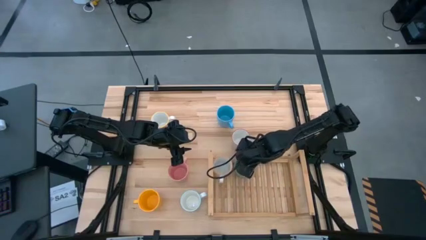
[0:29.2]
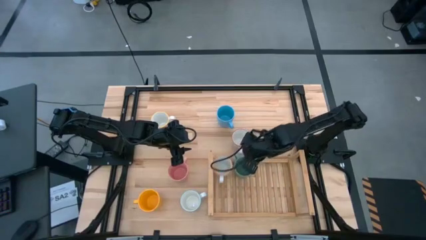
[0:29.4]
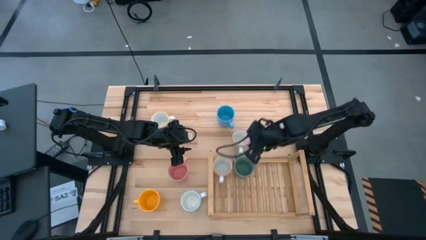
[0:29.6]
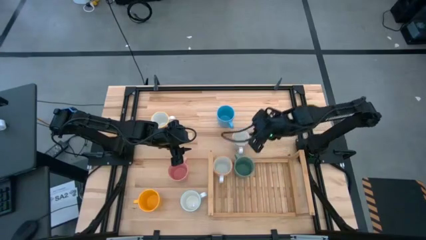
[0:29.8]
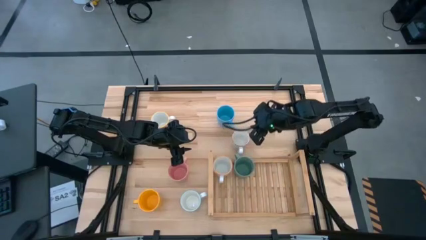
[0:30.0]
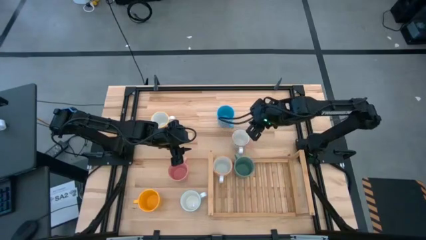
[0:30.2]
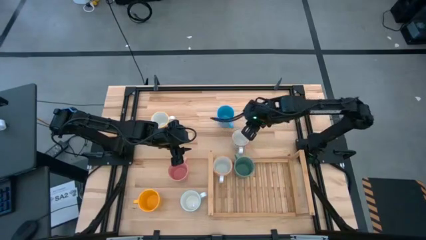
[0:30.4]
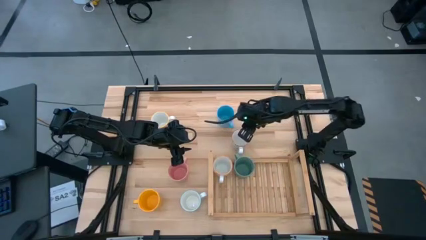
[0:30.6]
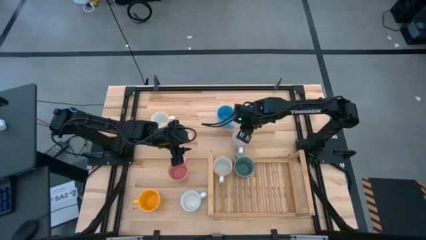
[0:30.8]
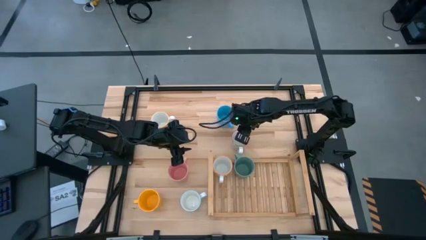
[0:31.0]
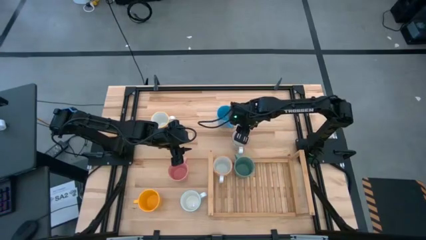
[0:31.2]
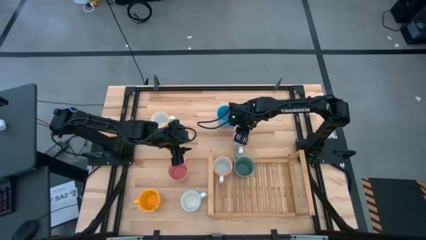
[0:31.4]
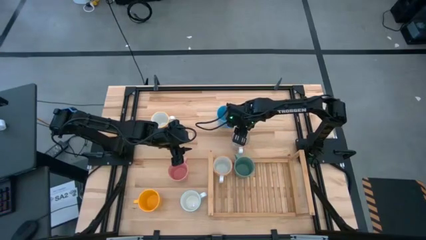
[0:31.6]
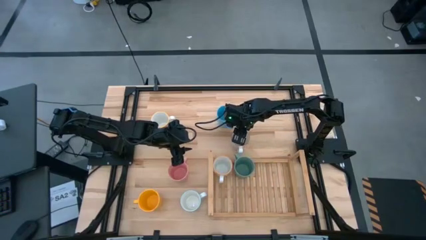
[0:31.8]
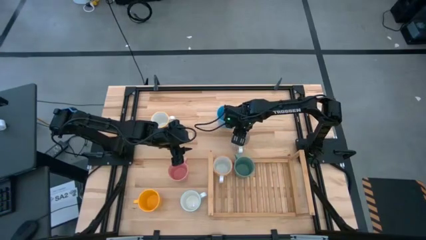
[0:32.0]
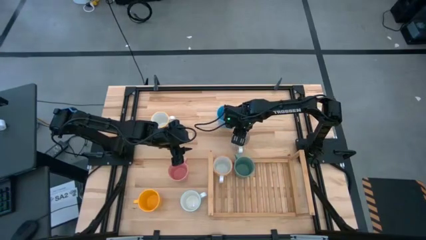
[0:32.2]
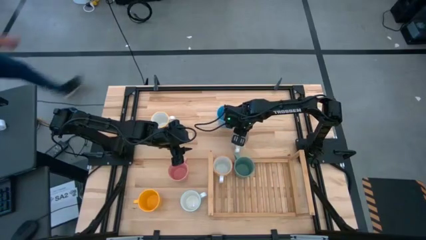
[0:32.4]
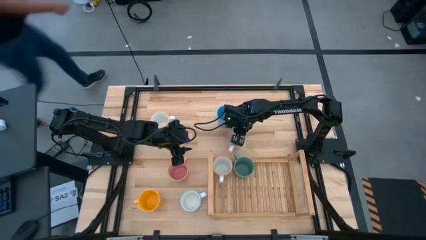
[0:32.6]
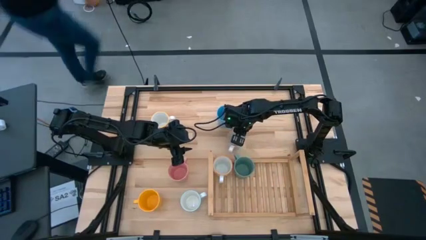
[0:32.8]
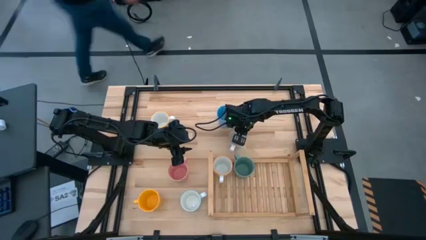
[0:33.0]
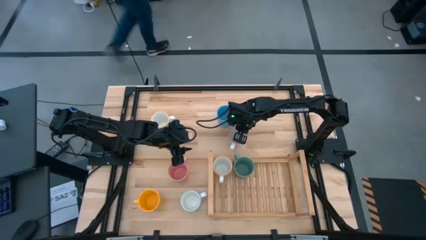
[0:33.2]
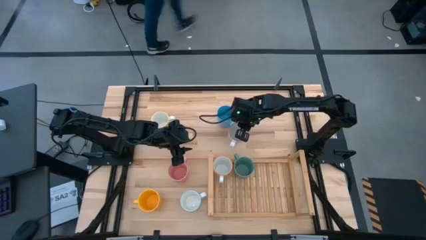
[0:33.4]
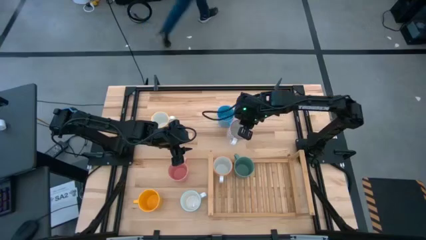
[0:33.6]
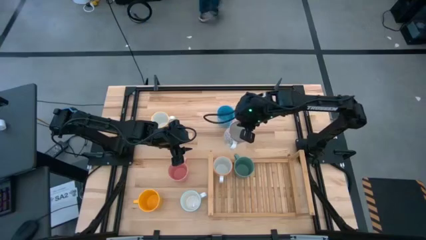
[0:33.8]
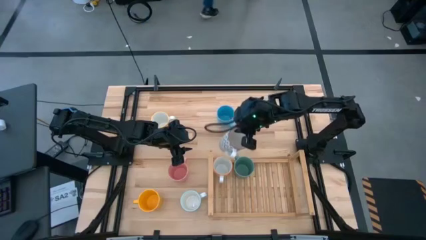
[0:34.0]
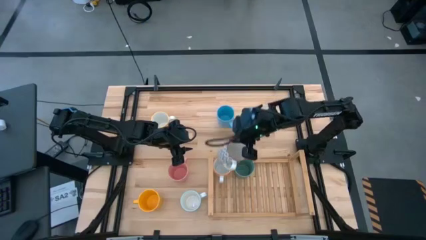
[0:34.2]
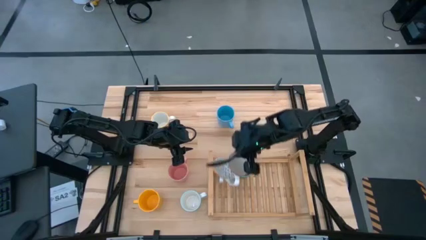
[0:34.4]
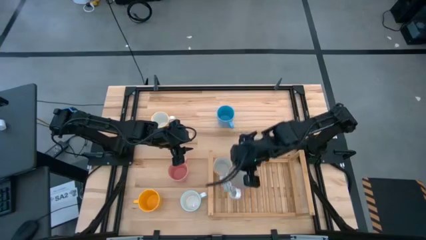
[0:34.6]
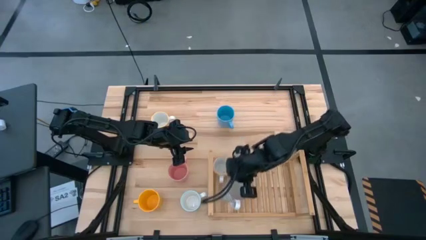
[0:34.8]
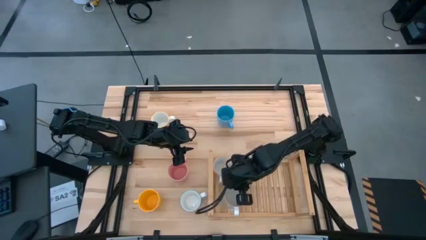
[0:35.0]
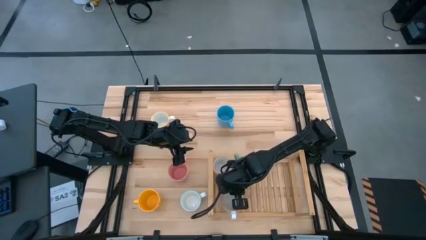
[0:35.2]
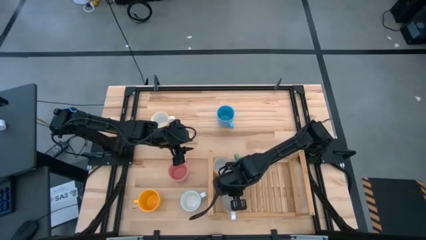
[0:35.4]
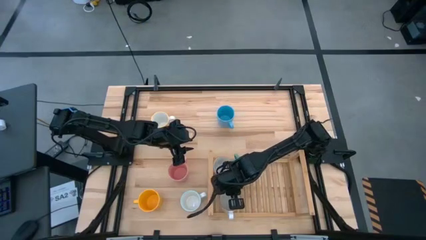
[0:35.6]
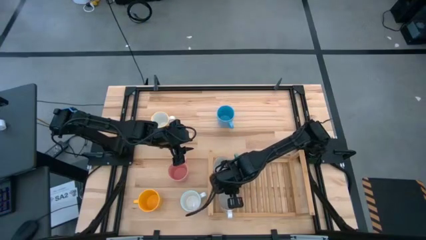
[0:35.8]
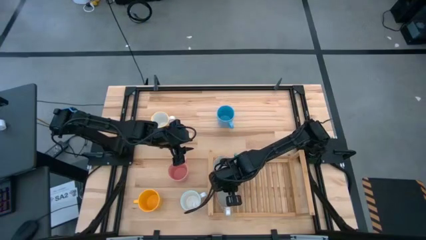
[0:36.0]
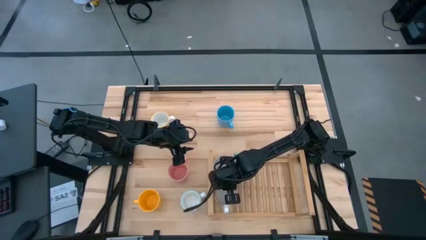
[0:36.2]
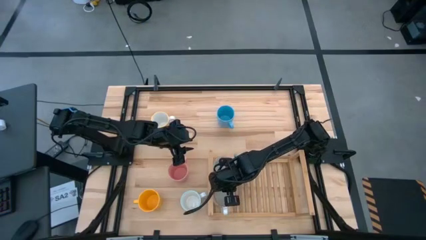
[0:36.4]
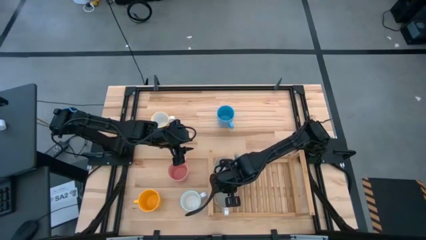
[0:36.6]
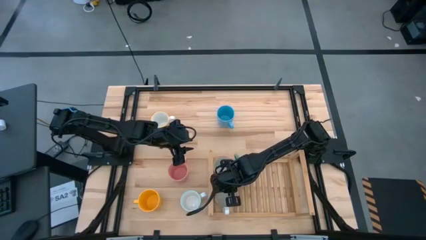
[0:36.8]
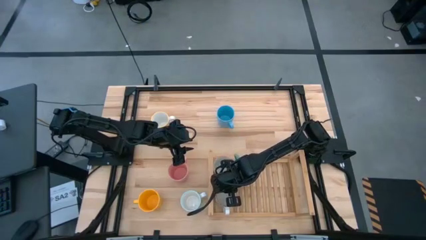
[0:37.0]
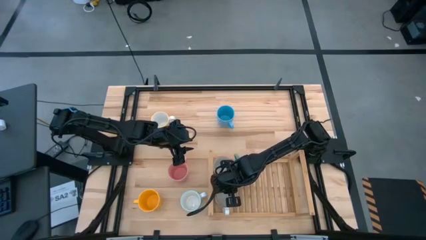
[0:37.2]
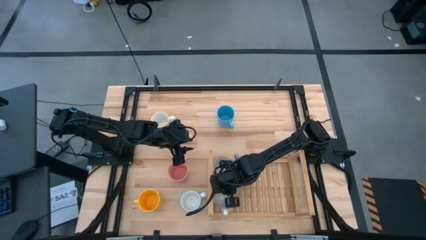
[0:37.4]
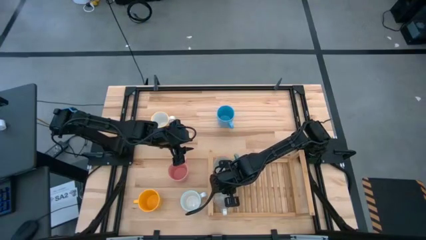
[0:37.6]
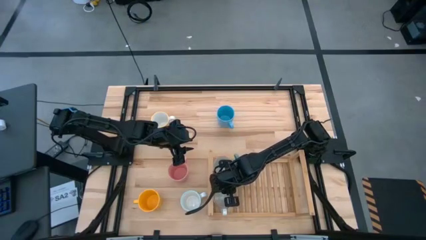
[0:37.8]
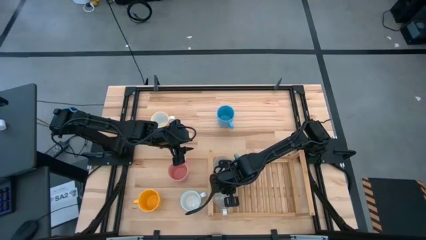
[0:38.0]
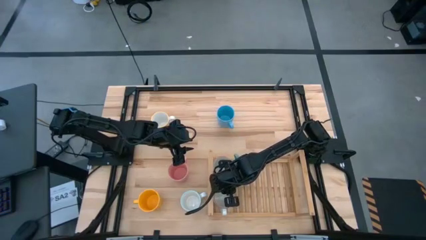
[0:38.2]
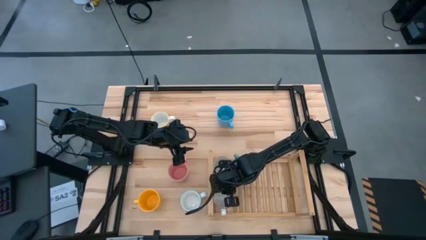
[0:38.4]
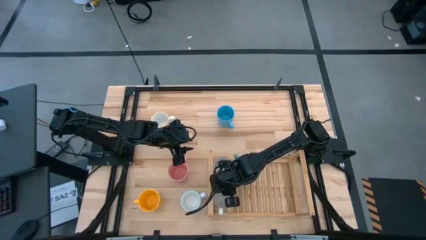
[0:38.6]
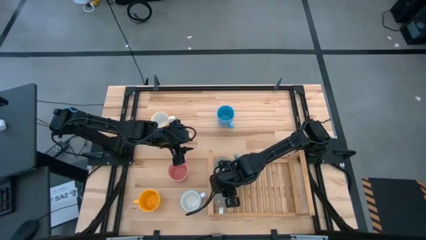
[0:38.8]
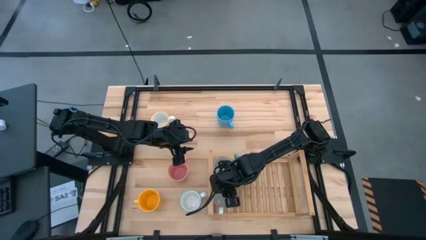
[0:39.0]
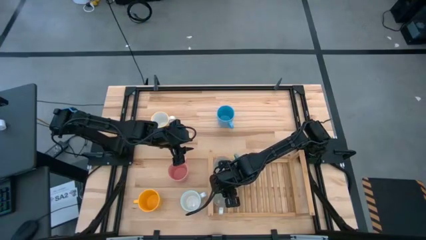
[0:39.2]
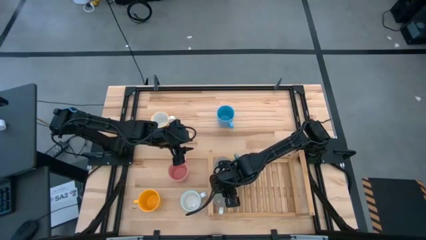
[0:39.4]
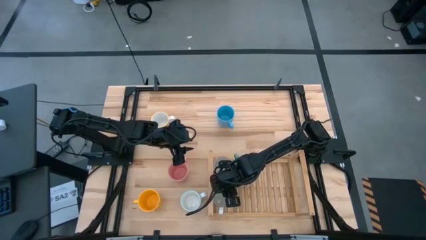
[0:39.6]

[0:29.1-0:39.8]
Task: Place coffee mugs
Put the red patterned mug on the shelf

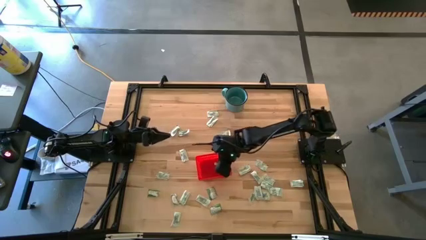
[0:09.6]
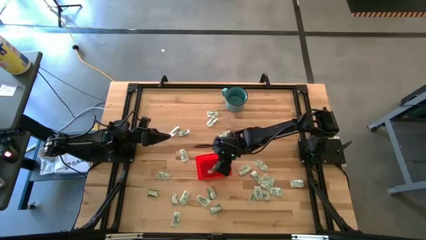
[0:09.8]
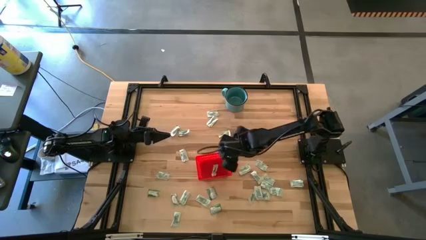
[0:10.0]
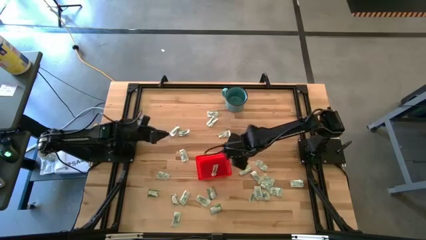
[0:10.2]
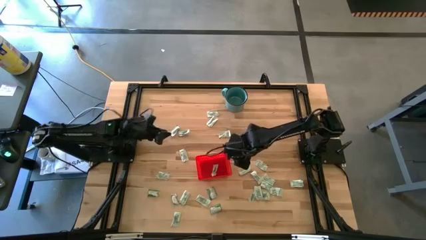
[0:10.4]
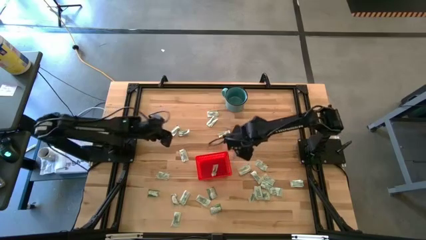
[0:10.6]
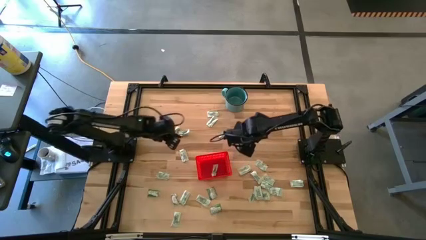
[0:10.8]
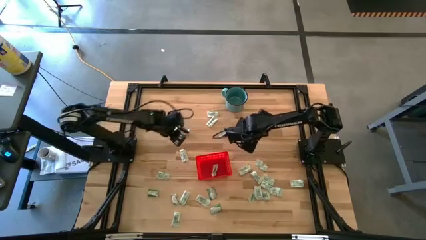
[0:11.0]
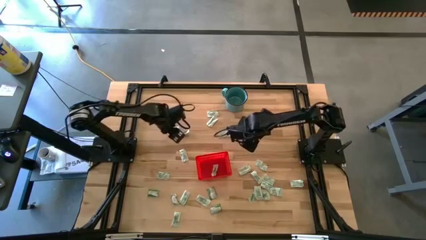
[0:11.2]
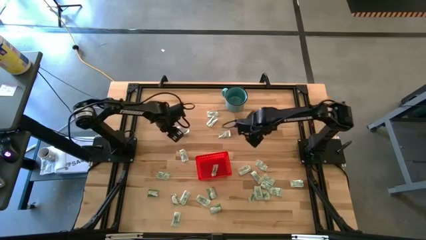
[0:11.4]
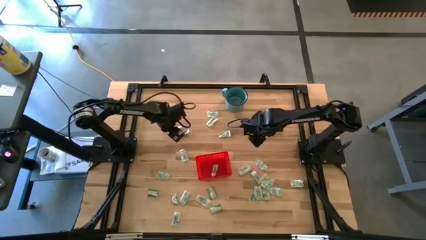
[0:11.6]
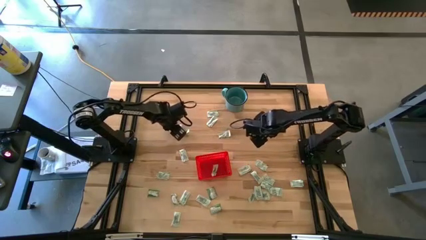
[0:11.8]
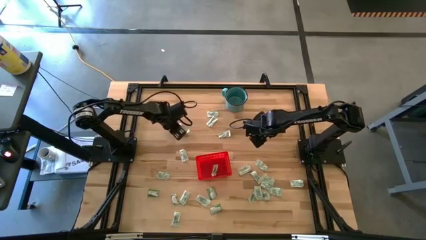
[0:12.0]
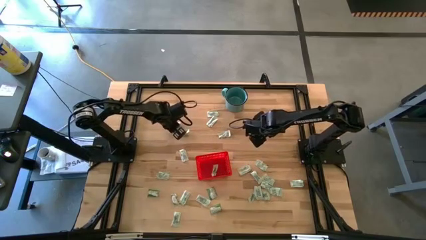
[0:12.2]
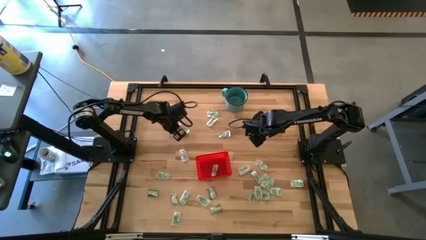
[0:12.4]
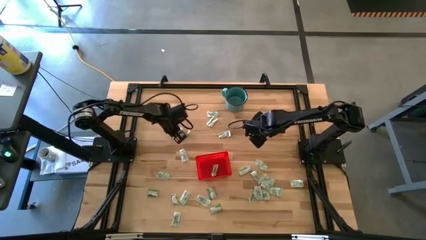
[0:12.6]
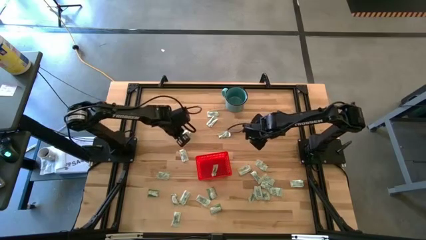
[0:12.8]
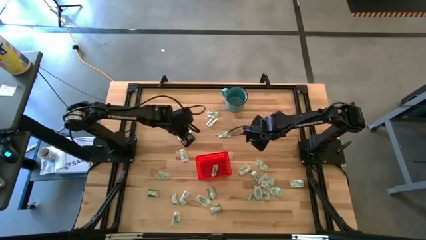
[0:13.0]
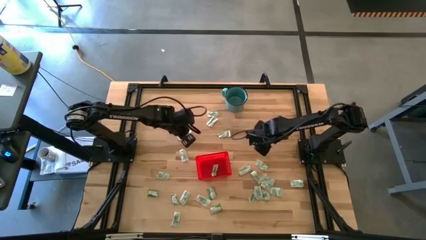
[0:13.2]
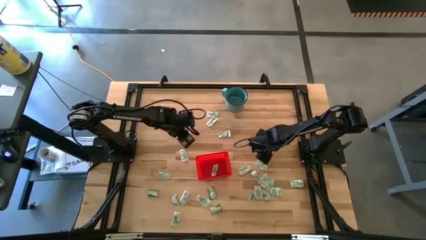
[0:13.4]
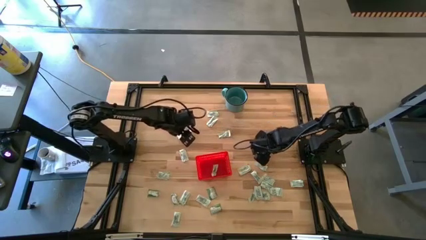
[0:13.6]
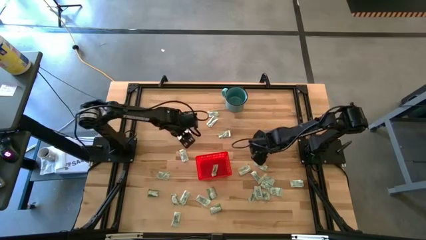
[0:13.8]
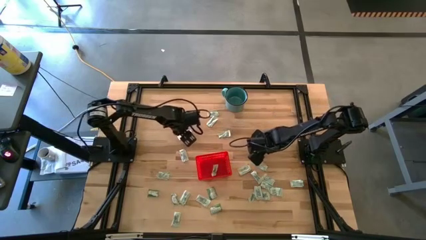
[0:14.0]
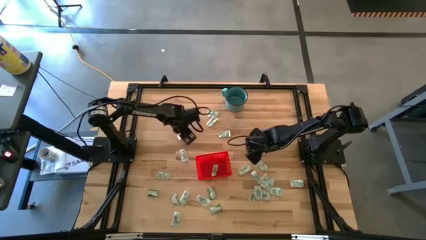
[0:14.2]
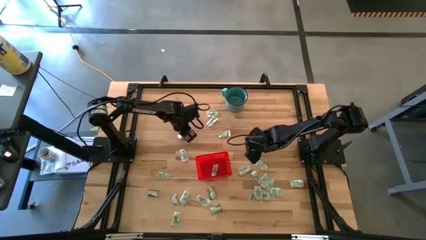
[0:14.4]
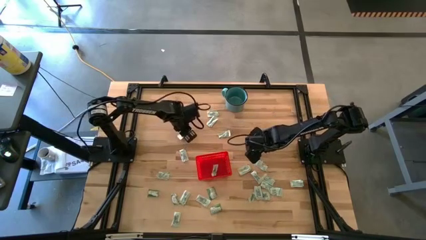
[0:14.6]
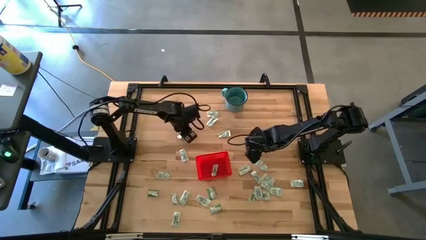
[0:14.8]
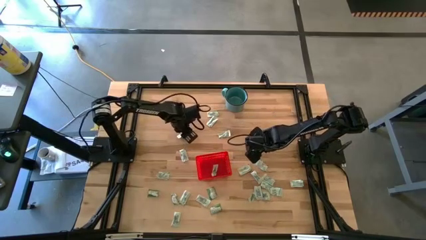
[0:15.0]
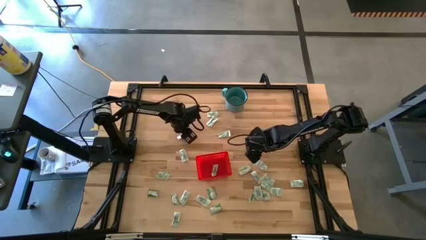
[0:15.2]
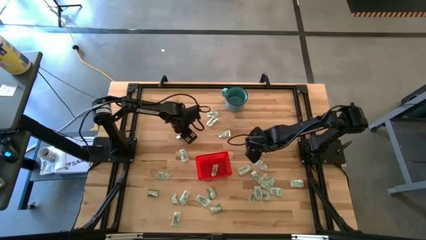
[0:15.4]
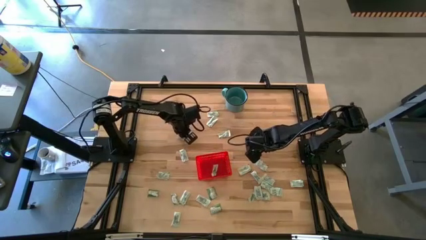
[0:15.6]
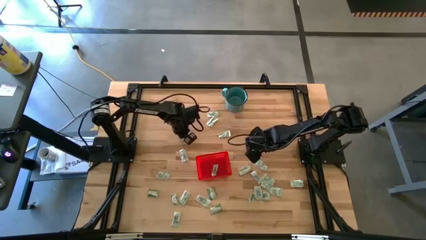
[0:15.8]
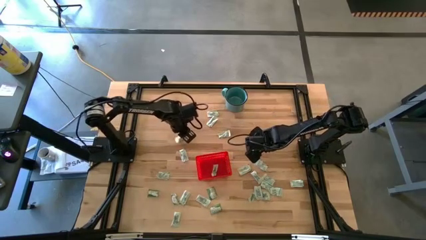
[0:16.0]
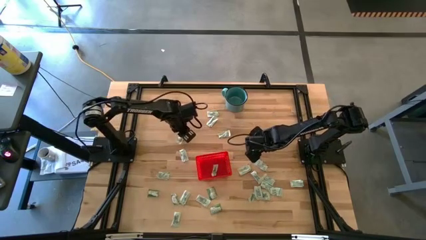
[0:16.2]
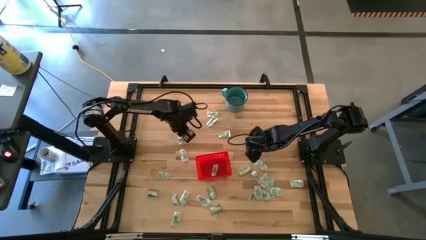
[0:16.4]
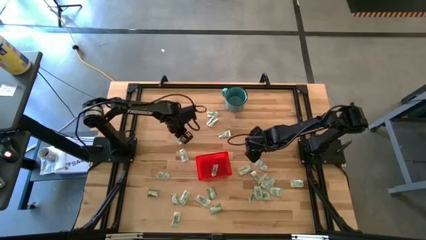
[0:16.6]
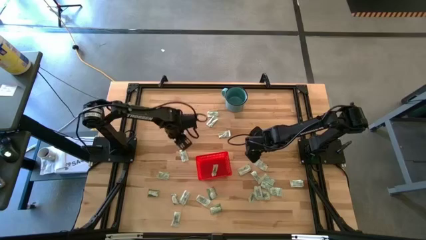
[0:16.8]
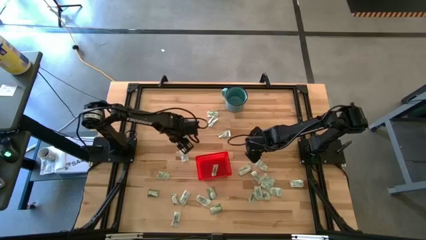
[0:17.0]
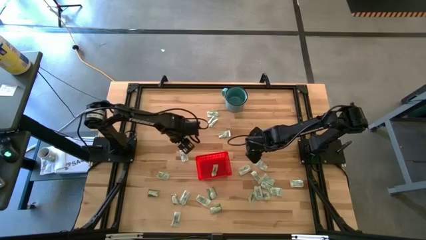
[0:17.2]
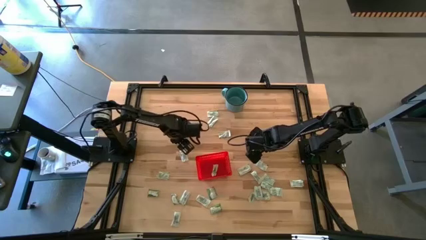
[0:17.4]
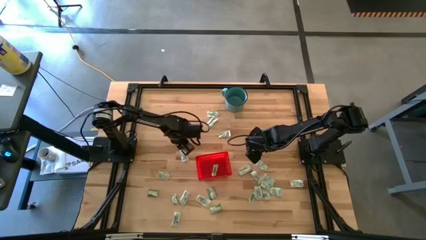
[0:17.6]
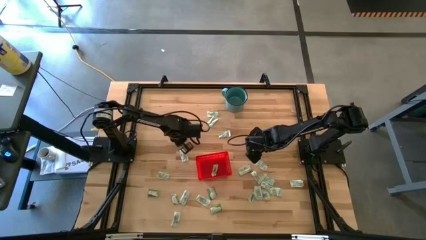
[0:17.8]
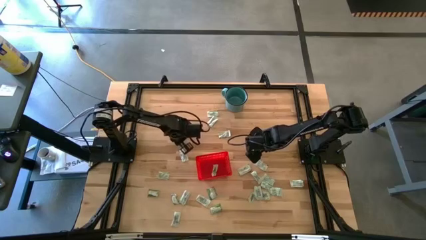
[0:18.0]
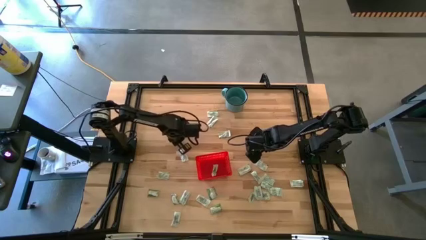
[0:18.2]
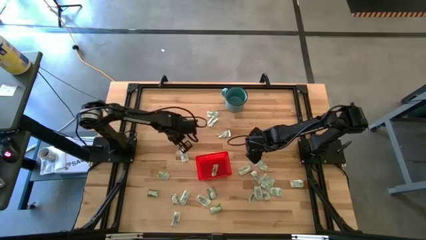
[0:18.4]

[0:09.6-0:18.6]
Task: Pick and place Stevia / Truvia into bins
Put the green stevia packet into the red bin
